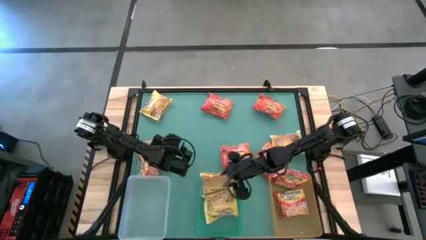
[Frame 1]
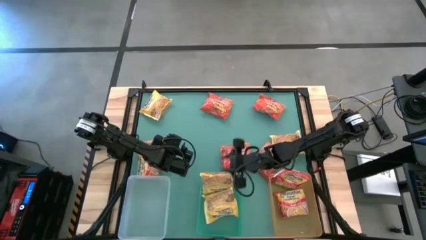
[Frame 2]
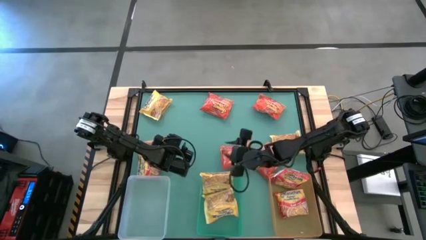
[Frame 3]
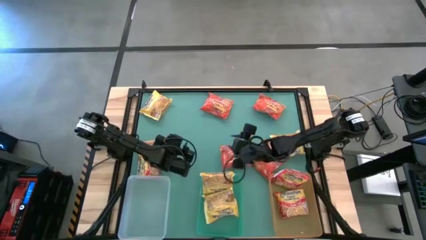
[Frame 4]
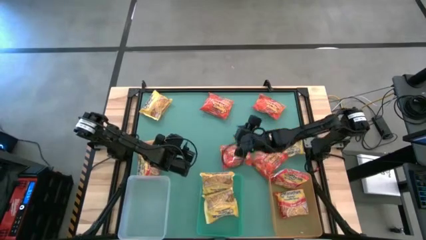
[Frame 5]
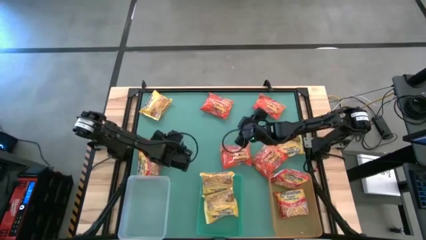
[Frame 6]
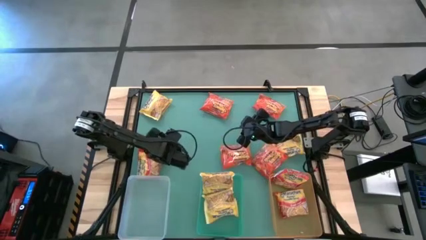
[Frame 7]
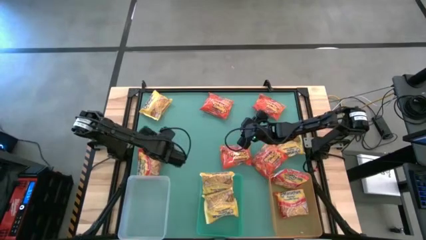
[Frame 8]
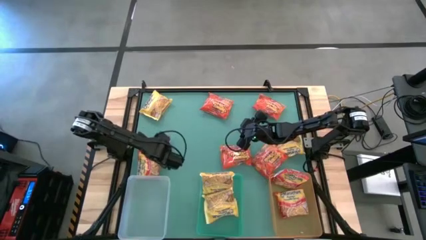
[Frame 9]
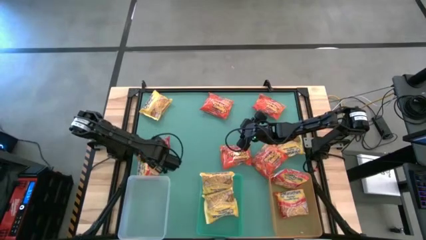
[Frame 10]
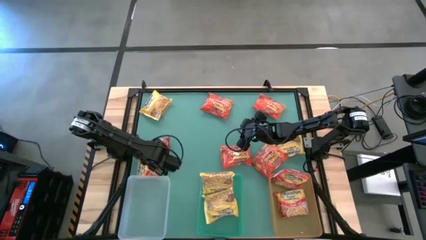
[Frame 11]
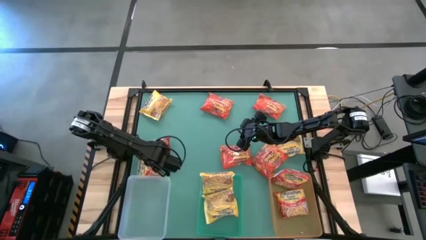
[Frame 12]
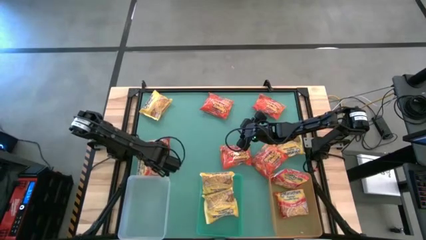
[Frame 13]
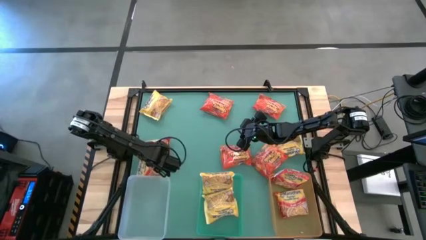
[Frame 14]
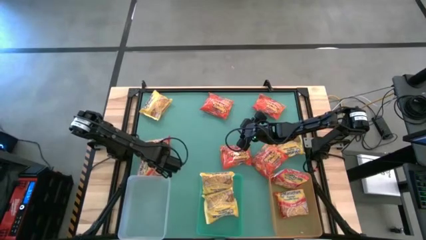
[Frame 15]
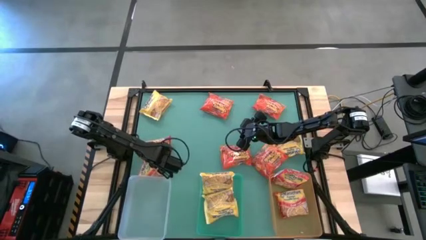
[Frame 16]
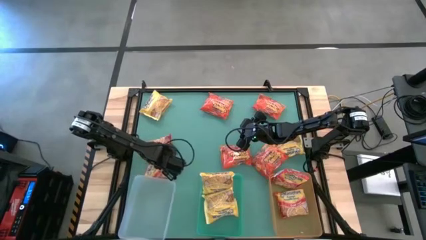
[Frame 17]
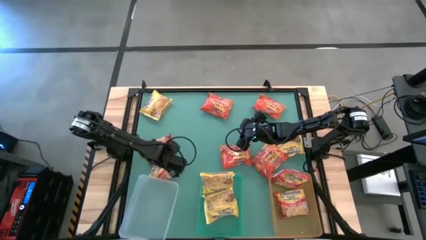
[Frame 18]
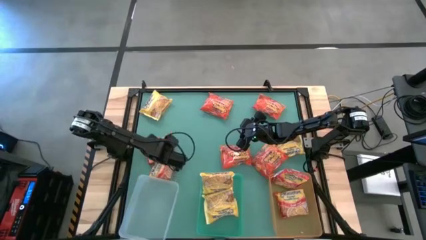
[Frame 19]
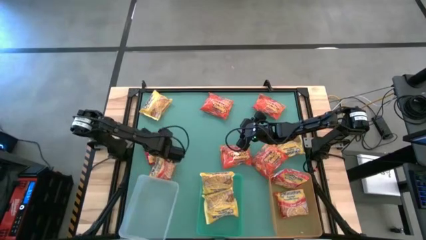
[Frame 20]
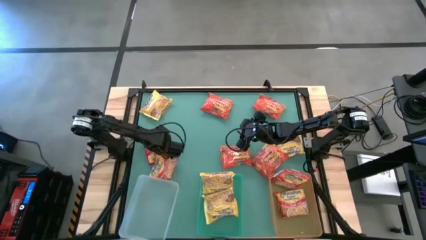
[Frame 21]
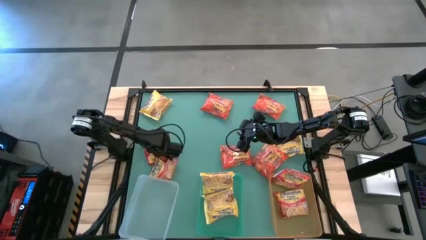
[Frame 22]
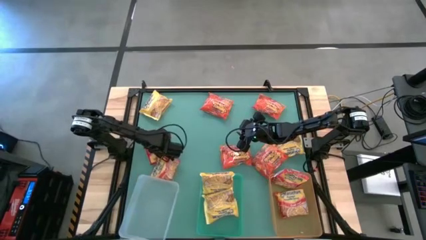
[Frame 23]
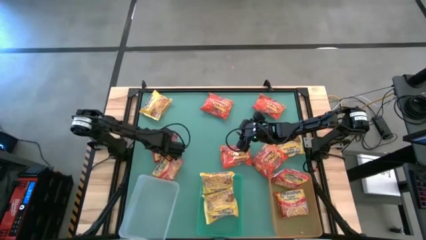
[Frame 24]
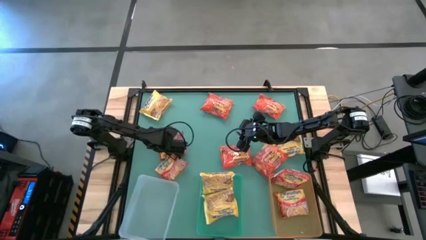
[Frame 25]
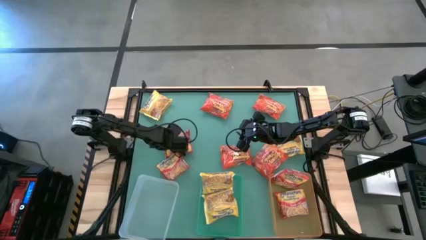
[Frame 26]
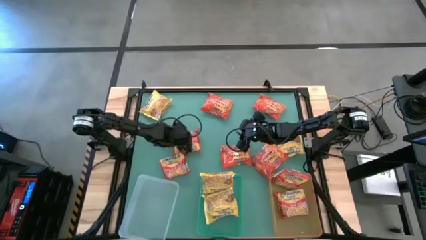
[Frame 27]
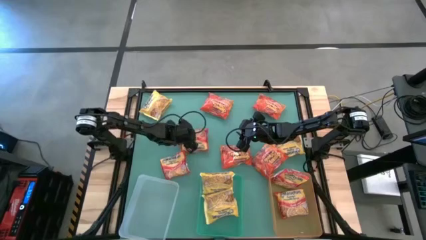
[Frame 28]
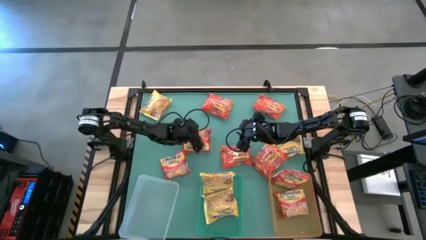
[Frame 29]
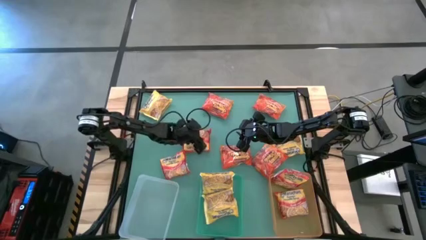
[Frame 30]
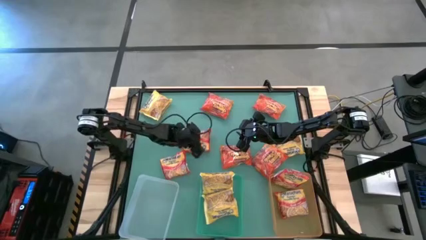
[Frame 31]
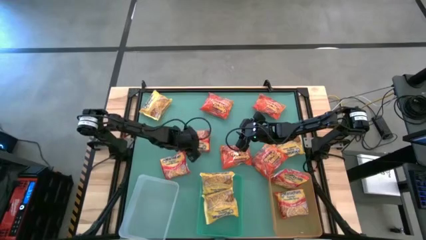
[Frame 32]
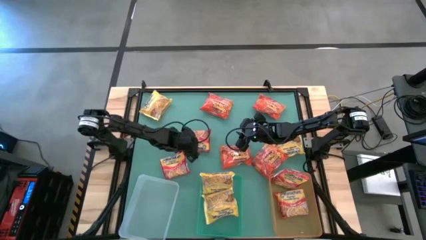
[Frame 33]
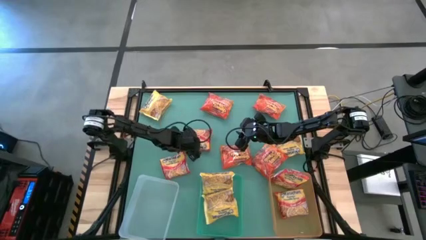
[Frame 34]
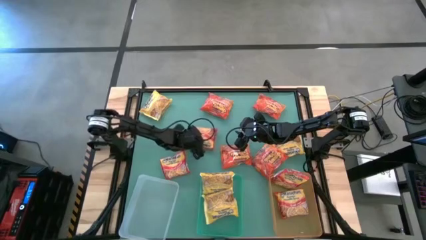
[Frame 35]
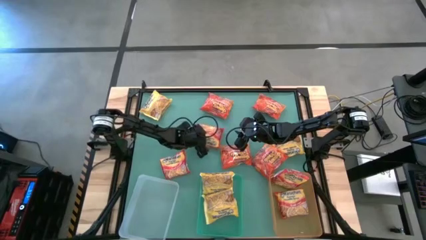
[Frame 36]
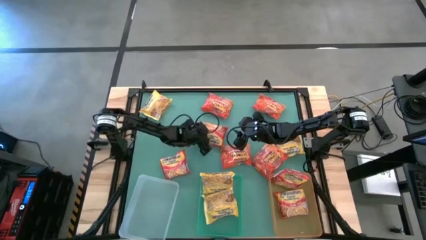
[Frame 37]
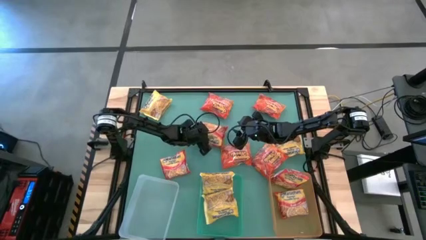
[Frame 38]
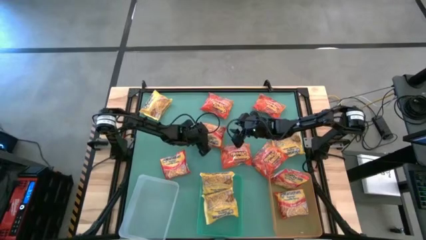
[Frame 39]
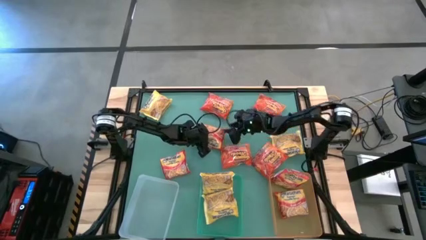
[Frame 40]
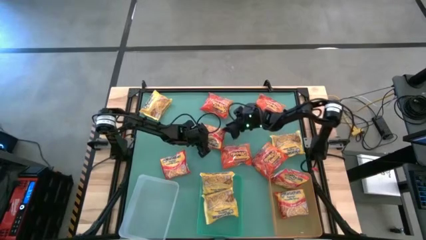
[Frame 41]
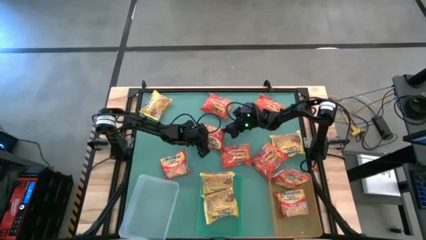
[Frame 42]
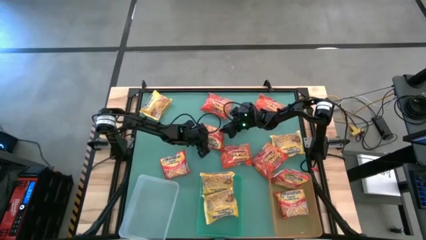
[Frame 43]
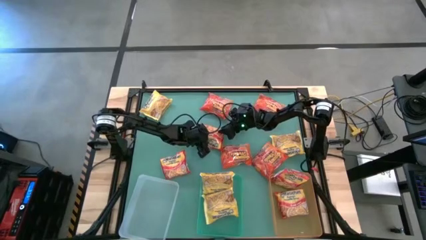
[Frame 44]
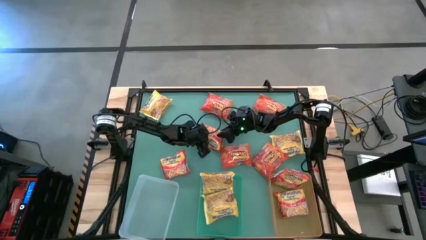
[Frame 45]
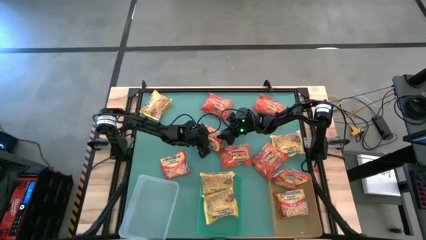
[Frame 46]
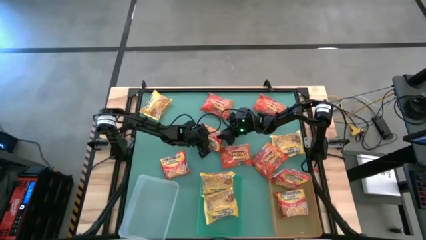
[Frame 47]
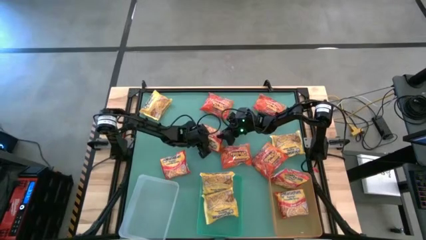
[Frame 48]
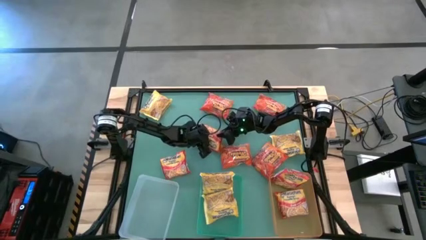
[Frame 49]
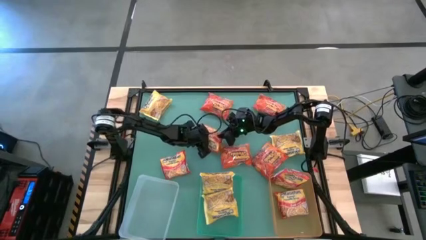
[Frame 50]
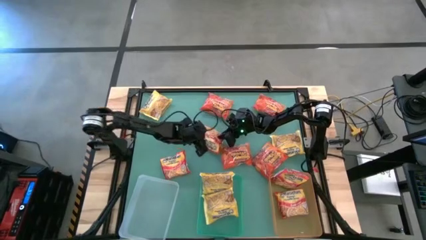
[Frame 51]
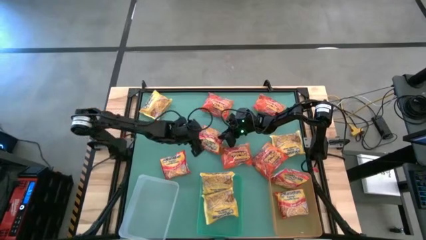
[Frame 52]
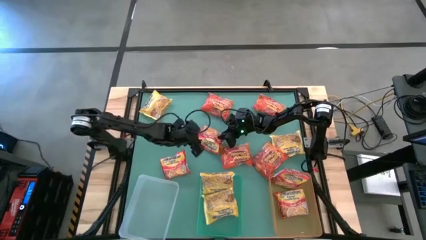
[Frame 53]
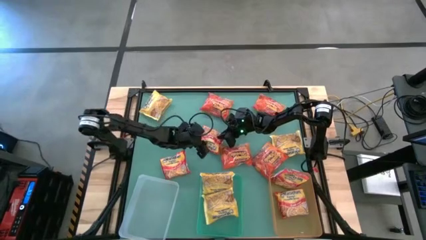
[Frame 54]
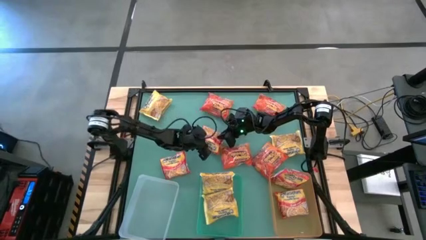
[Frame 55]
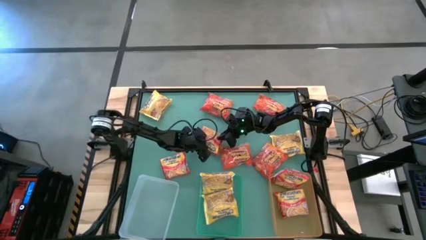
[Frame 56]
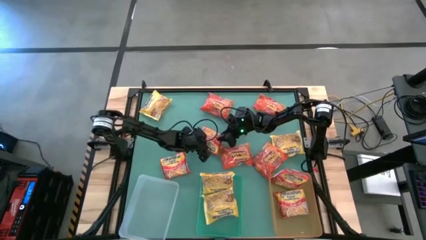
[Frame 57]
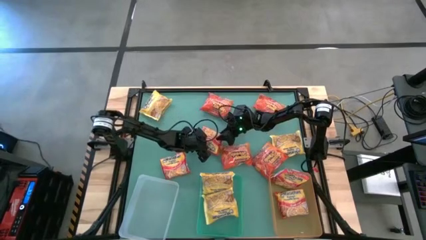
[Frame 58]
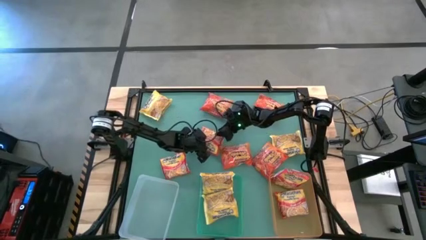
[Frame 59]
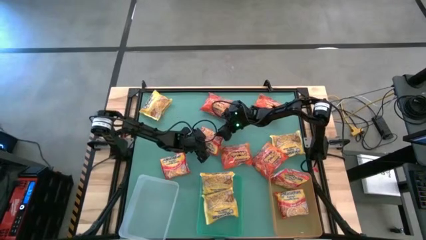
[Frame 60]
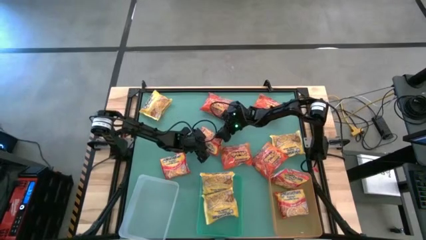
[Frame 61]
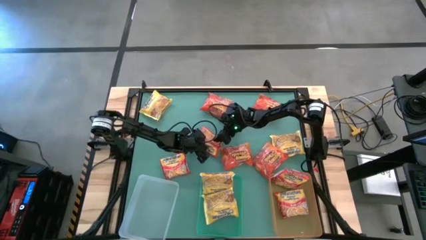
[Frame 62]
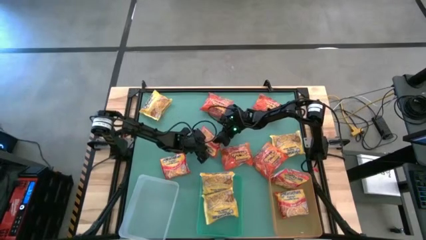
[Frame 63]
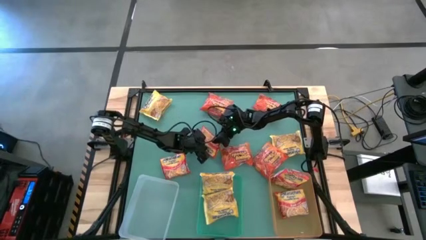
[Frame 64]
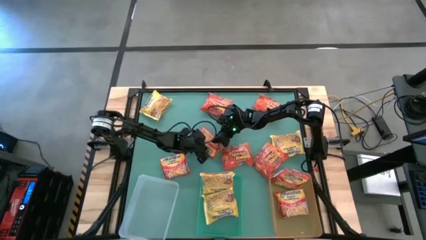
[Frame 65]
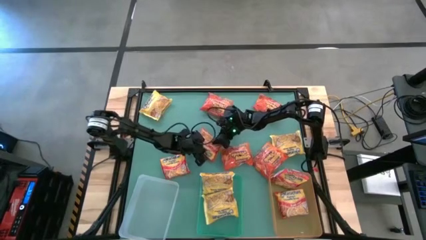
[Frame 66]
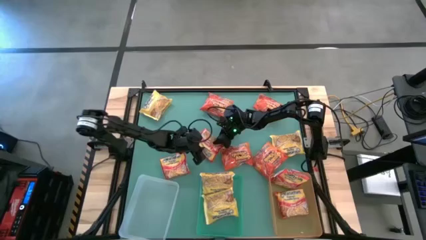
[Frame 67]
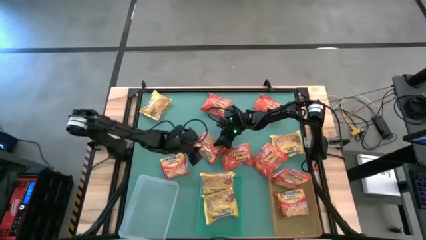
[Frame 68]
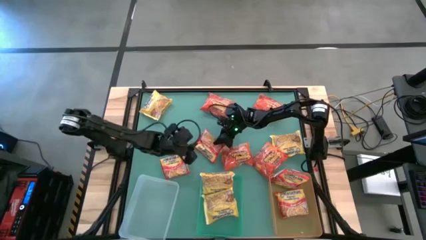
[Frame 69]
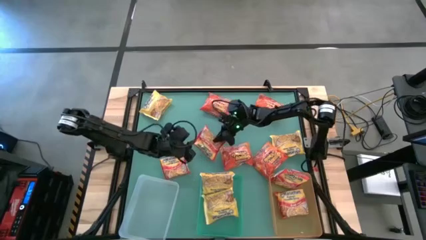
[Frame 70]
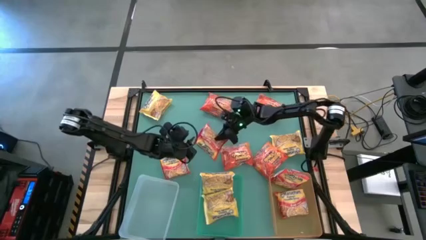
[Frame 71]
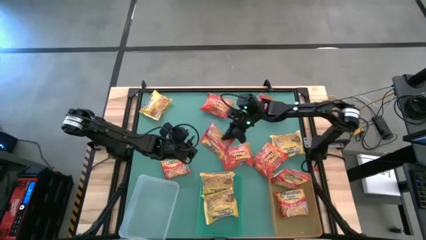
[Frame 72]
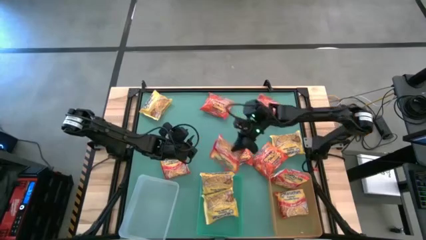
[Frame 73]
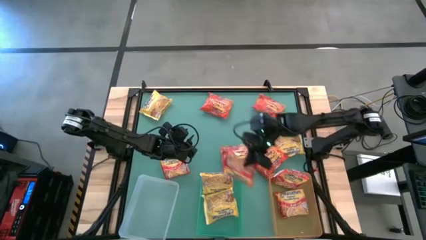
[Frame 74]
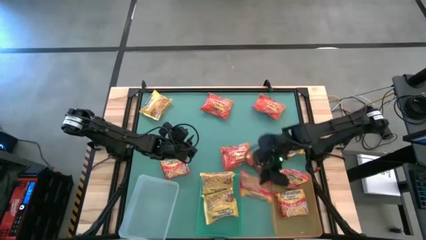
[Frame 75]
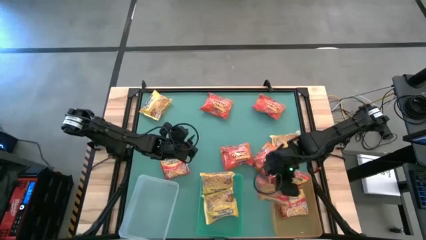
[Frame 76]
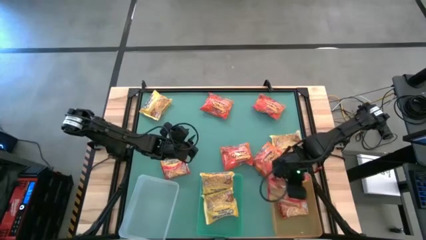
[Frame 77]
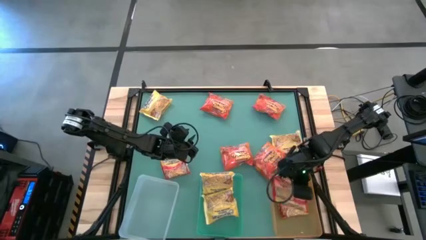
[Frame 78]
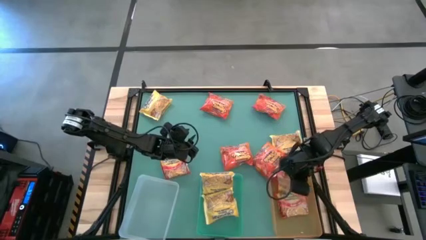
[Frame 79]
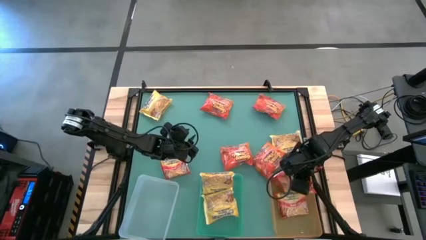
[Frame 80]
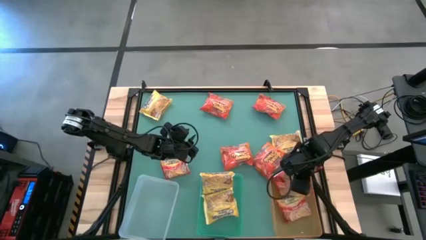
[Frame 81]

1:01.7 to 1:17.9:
Task: Sort Maruchan noodles
Put the red noodle pack into the orange bin
